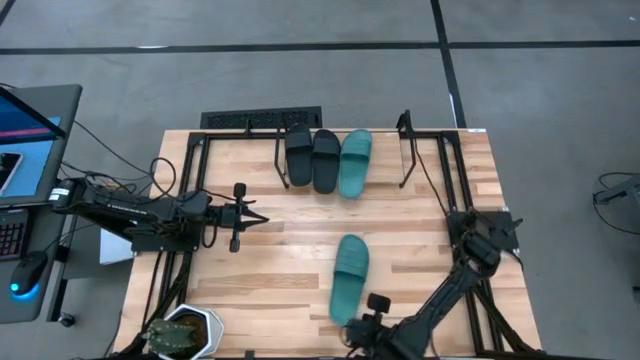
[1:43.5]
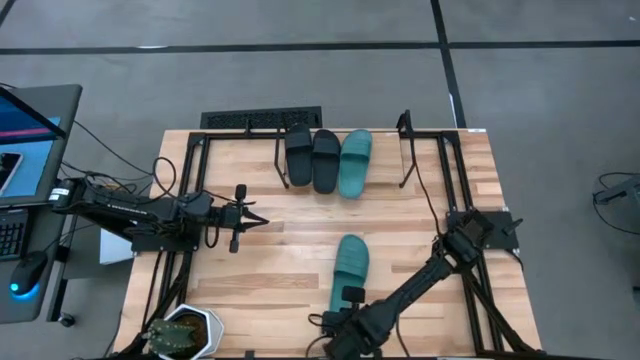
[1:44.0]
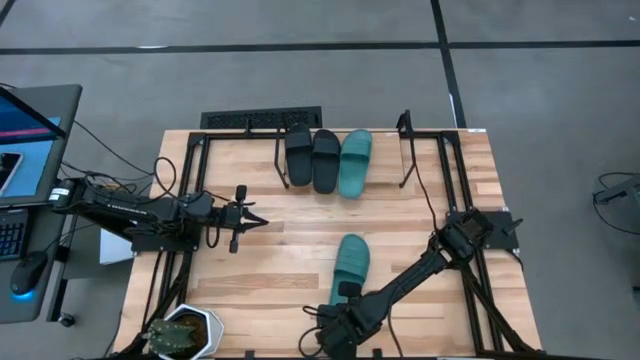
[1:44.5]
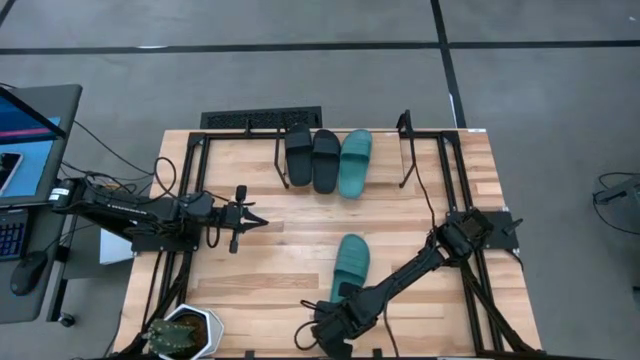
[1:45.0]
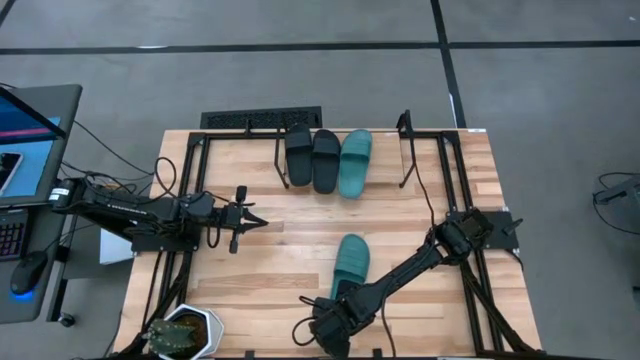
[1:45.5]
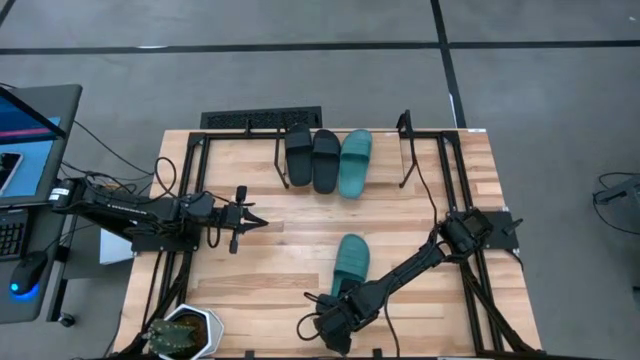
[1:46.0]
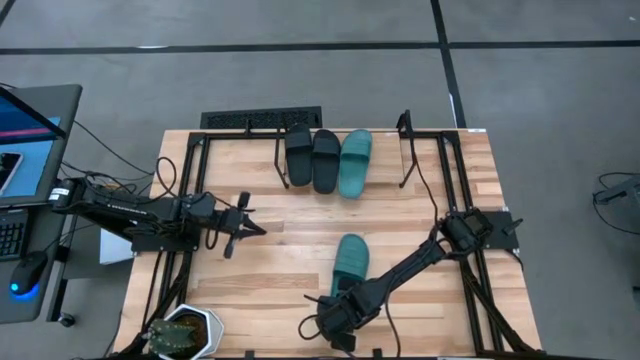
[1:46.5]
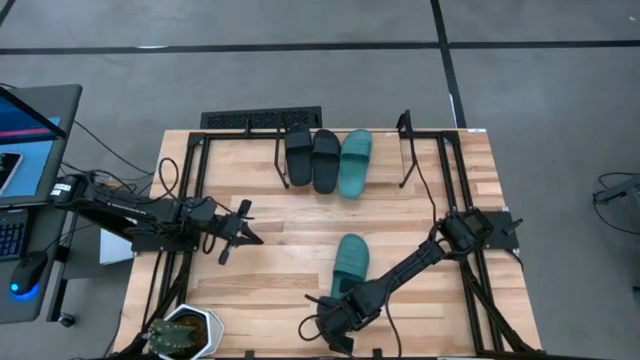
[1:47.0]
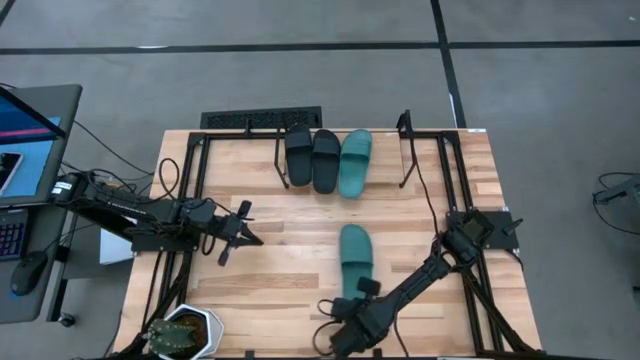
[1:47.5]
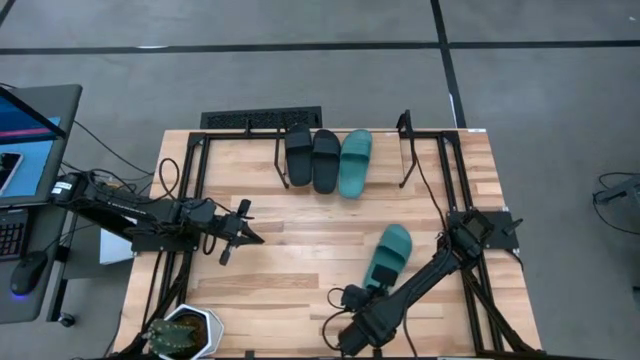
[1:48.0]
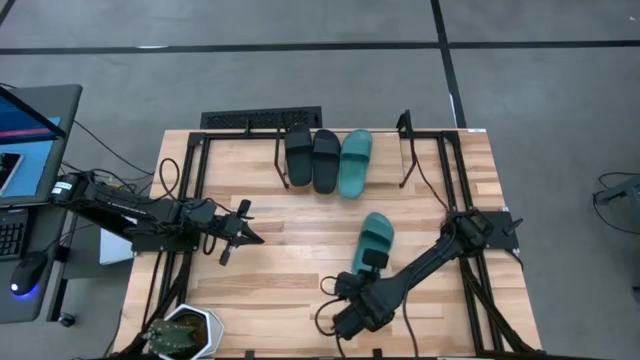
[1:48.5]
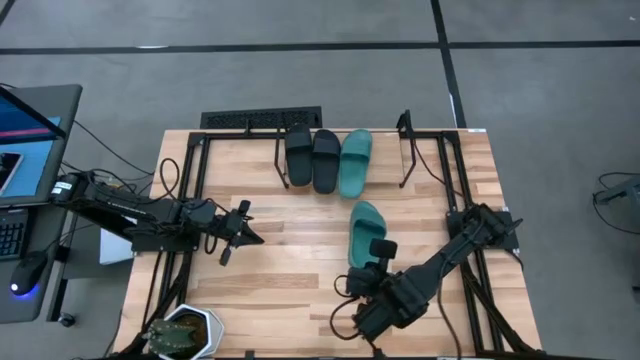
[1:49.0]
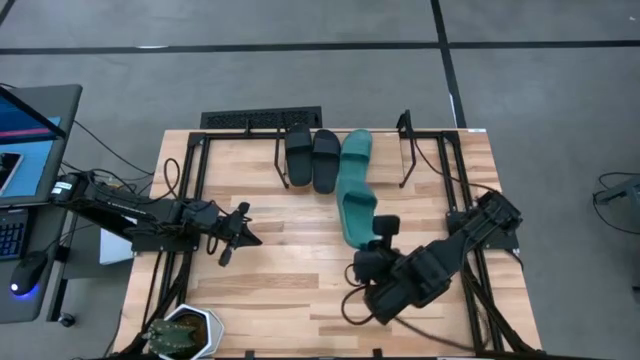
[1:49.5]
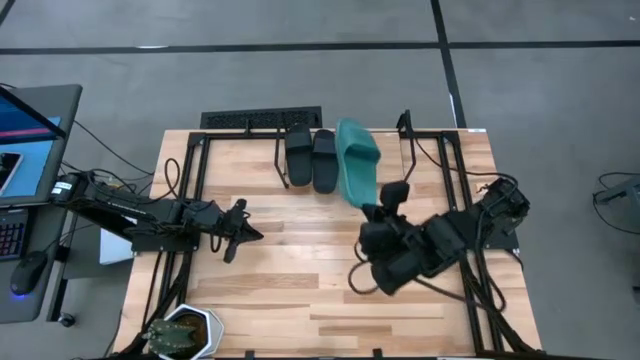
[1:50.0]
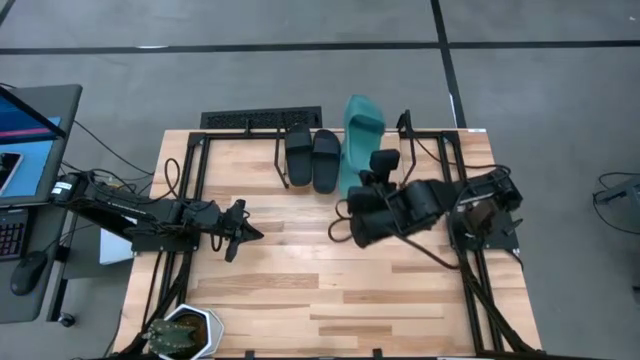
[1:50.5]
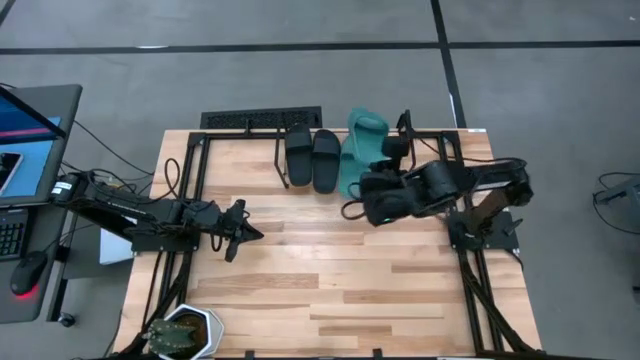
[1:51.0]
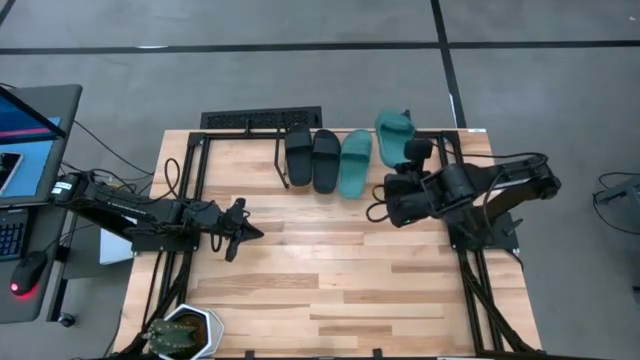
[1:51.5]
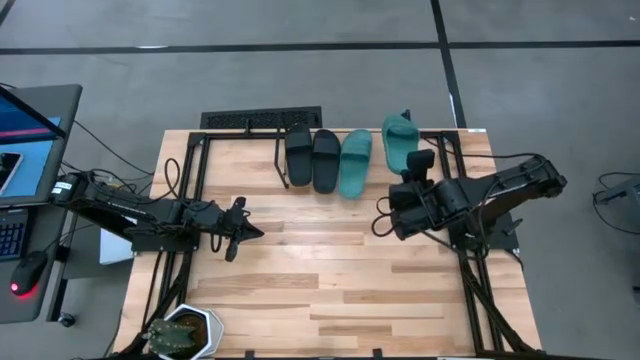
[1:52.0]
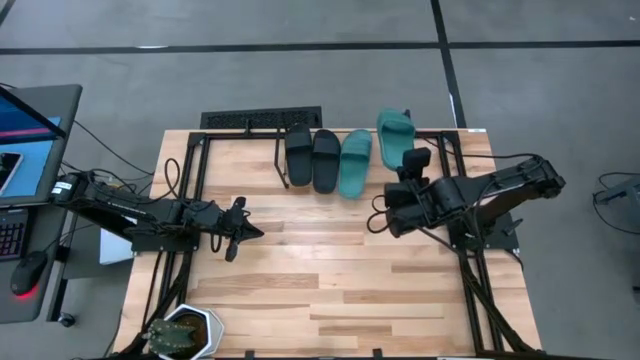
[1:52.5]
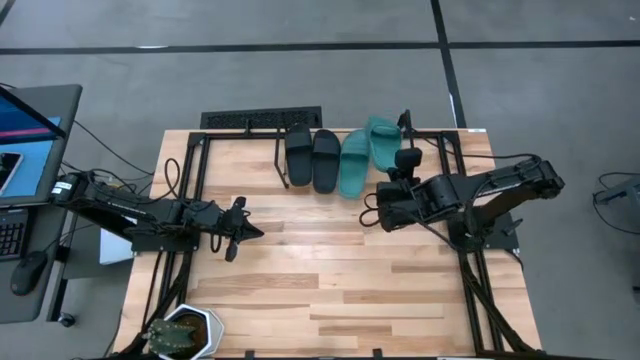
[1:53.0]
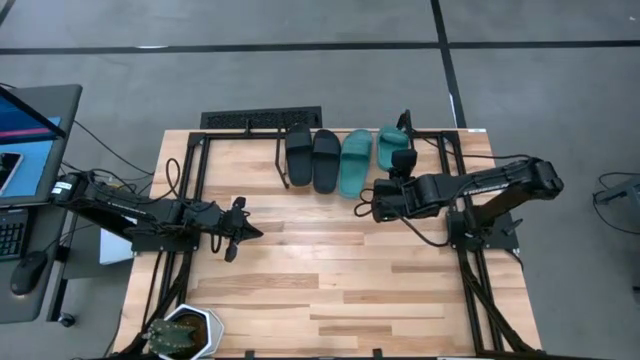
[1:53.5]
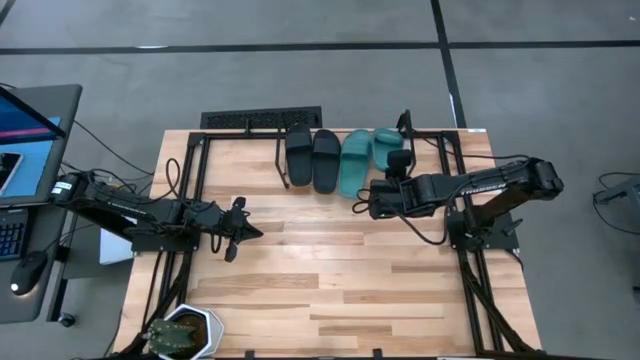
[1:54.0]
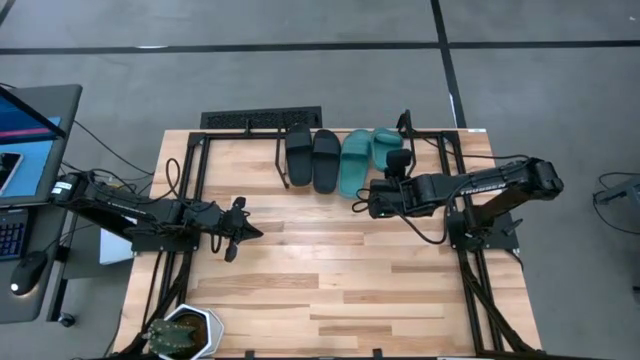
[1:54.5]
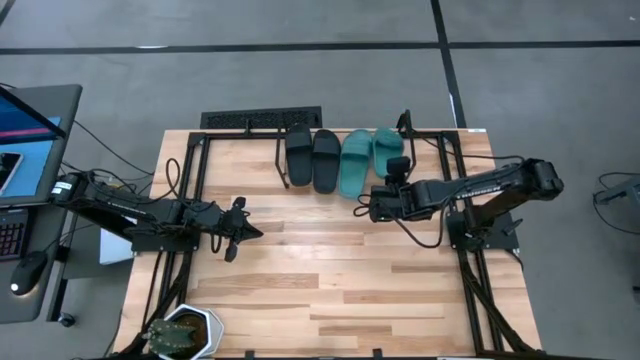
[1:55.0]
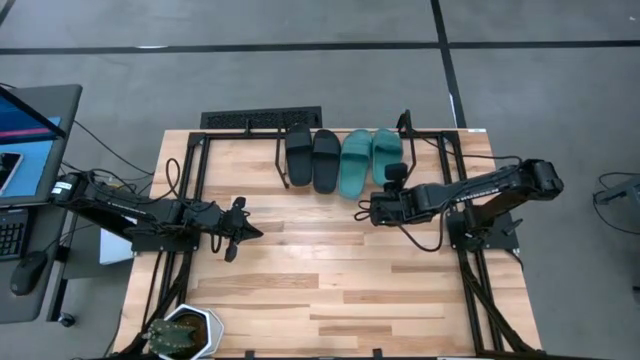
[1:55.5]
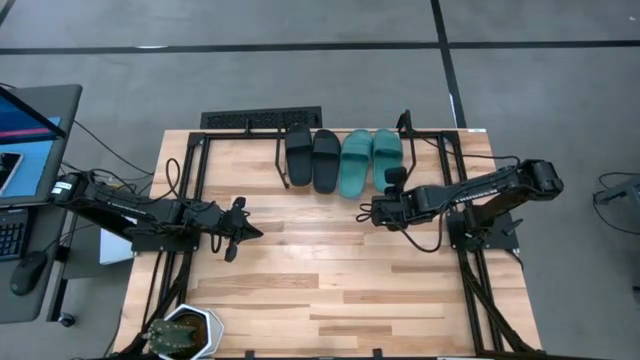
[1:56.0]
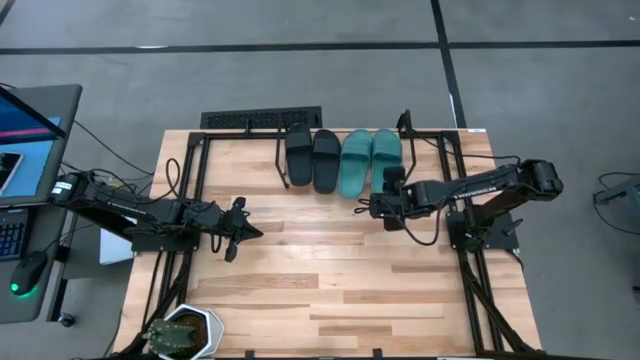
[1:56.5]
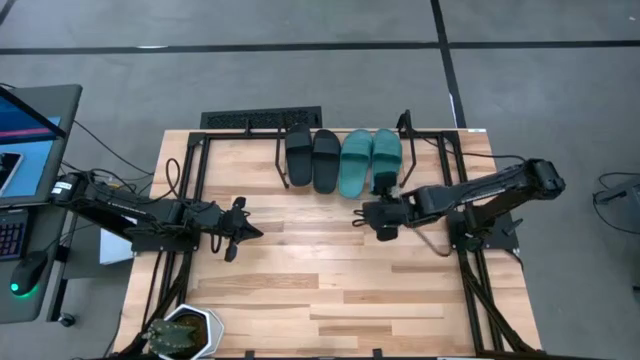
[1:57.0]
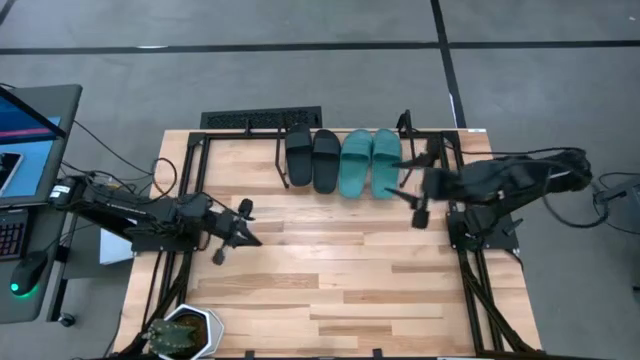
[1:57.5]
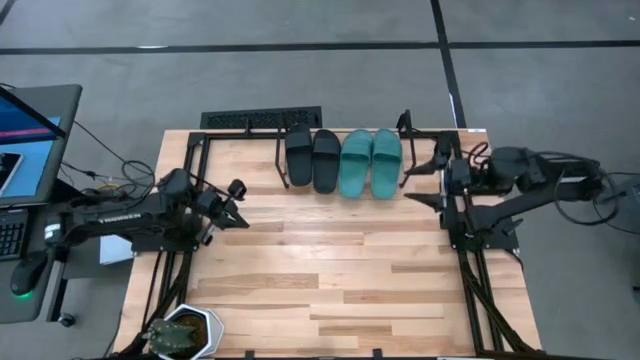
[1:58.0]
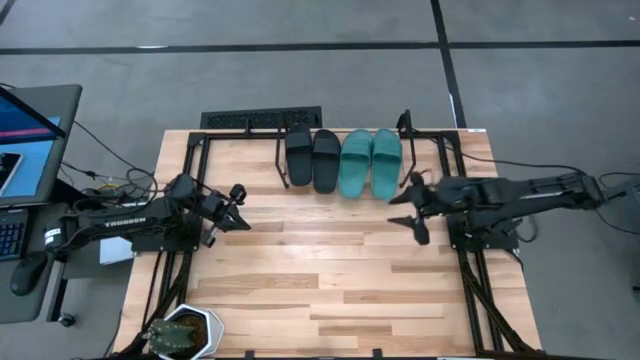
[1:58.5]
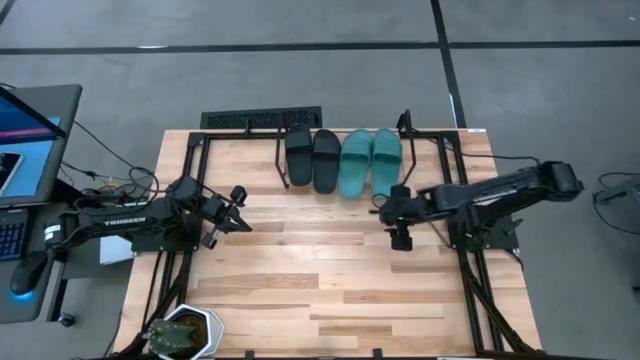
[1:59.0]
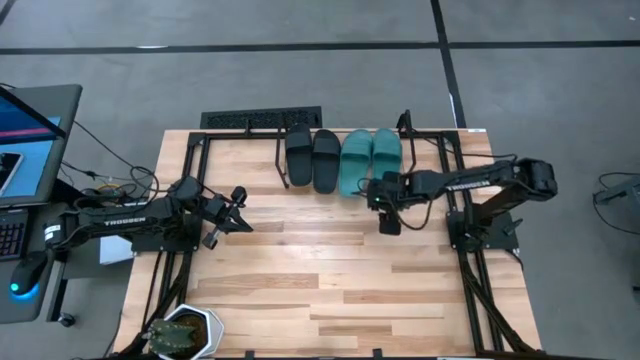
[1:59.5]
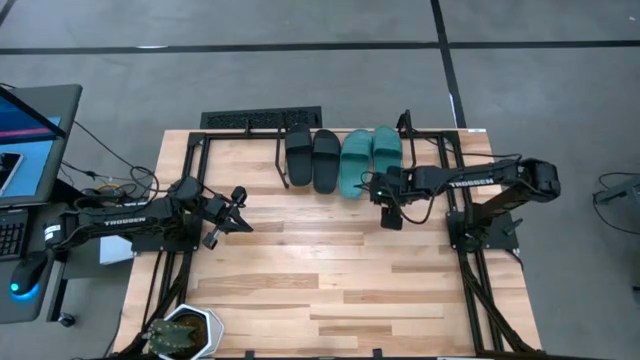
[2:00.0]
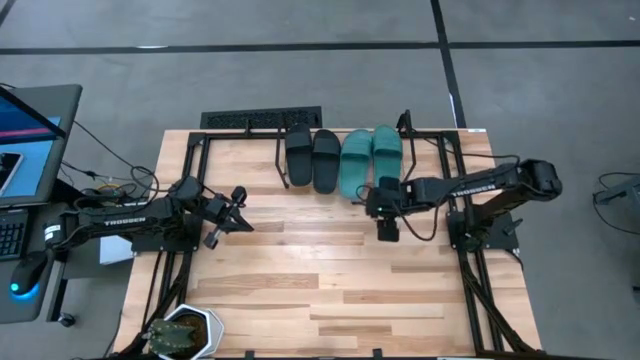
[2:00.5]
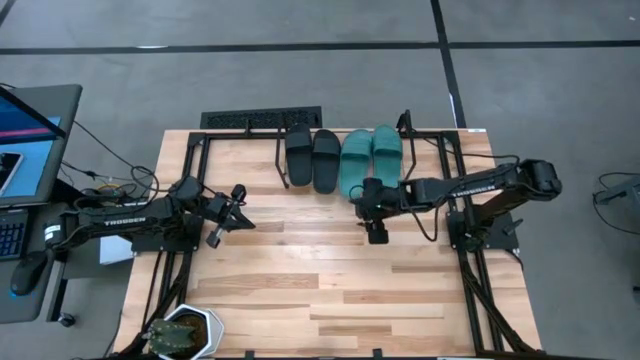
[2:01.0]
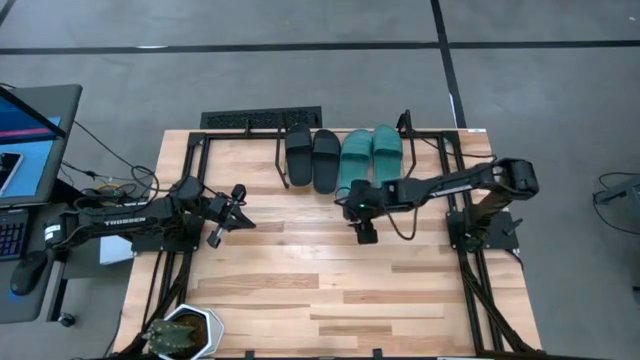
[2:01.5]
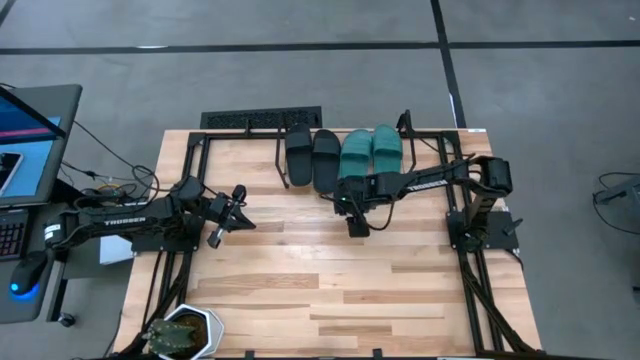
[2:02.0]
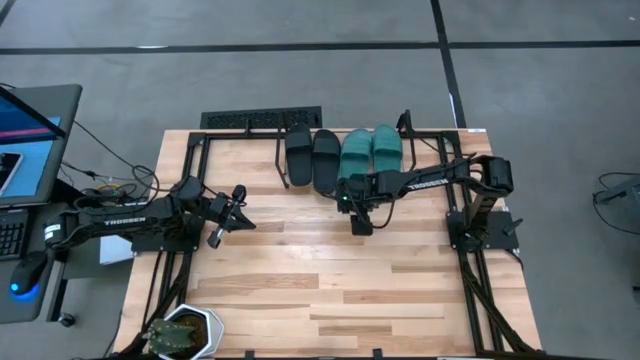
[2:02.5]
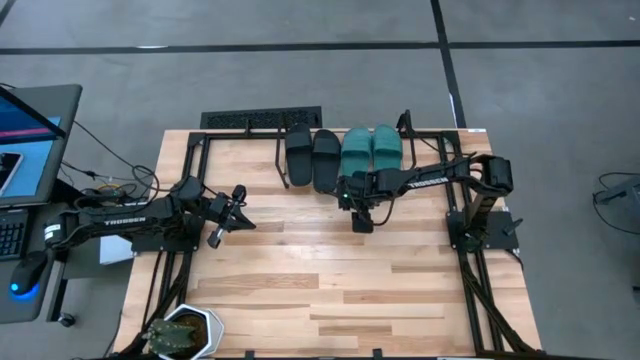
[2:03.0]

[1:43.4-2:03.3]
Task: Pick and place slides into the shelf
Put the dark green slipper on the shelf
